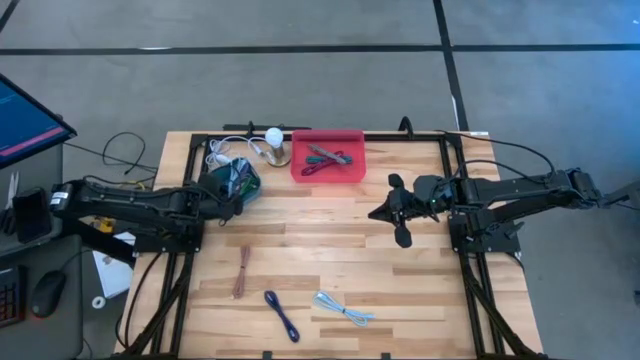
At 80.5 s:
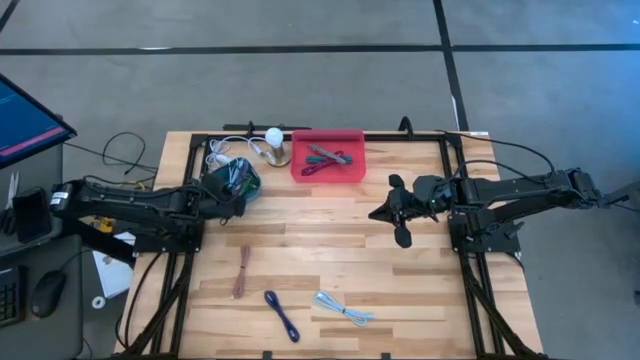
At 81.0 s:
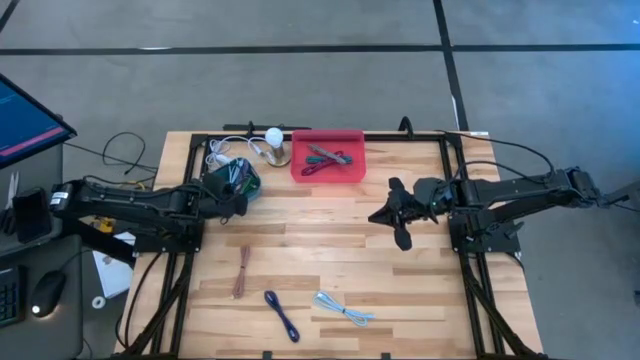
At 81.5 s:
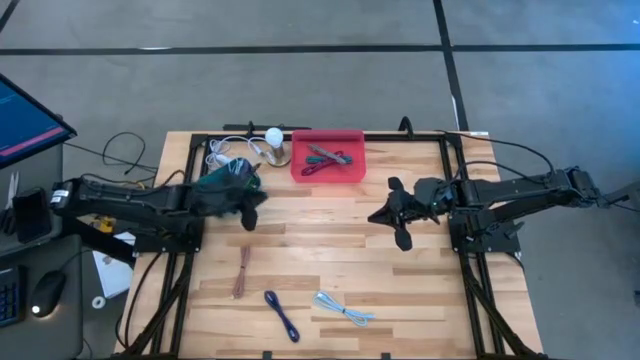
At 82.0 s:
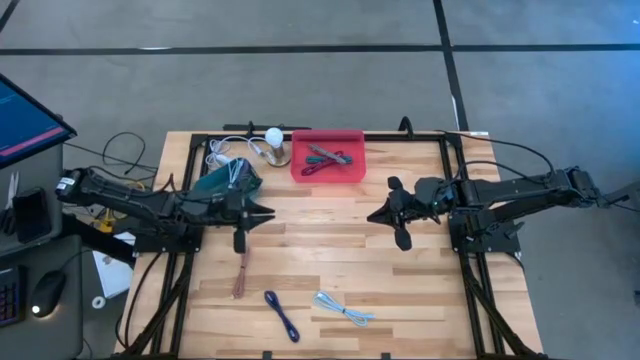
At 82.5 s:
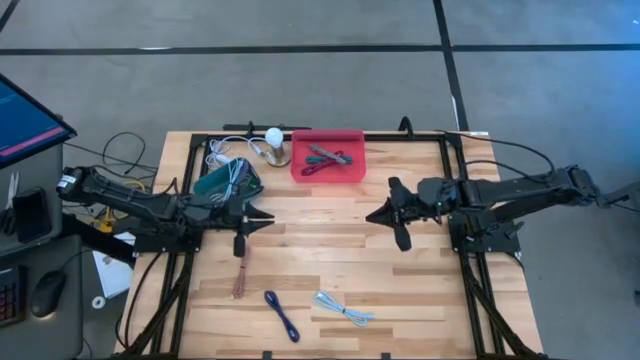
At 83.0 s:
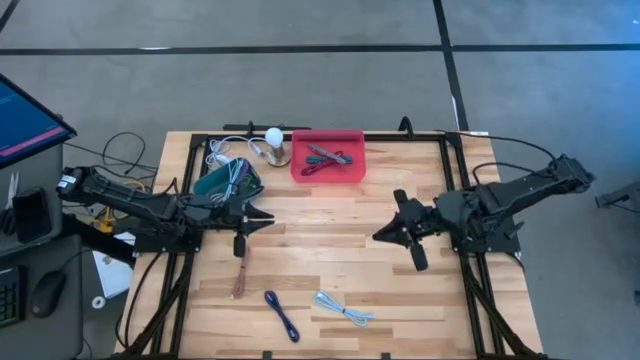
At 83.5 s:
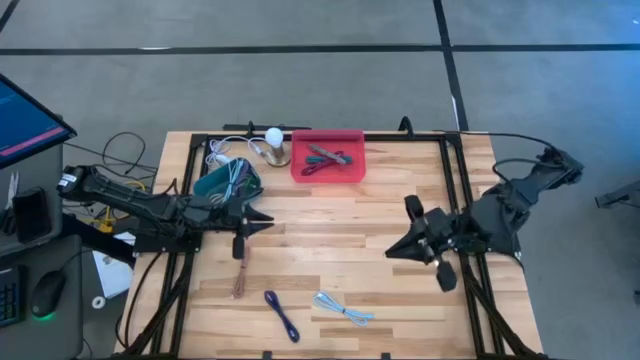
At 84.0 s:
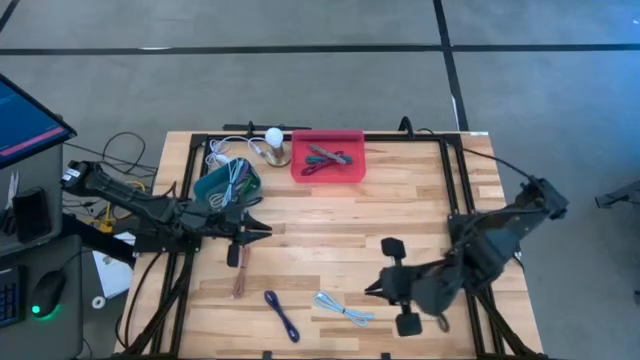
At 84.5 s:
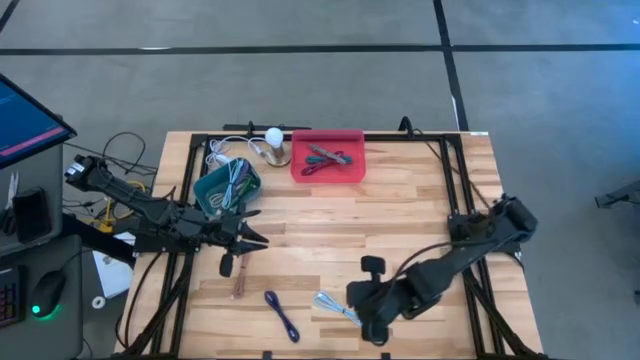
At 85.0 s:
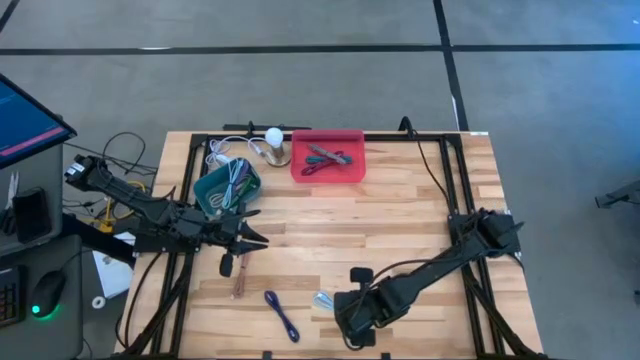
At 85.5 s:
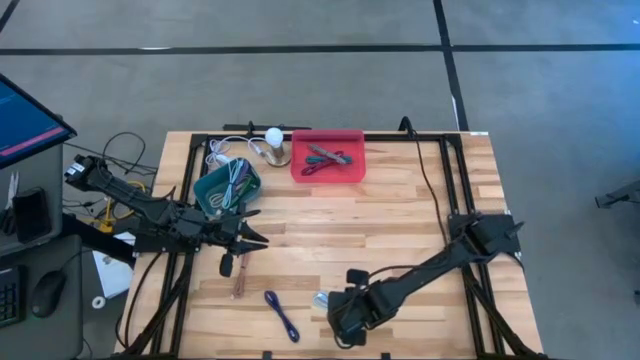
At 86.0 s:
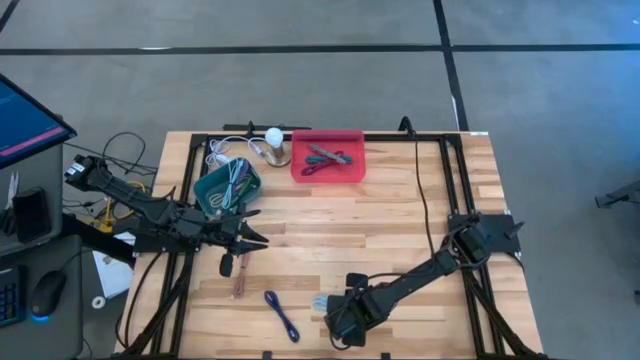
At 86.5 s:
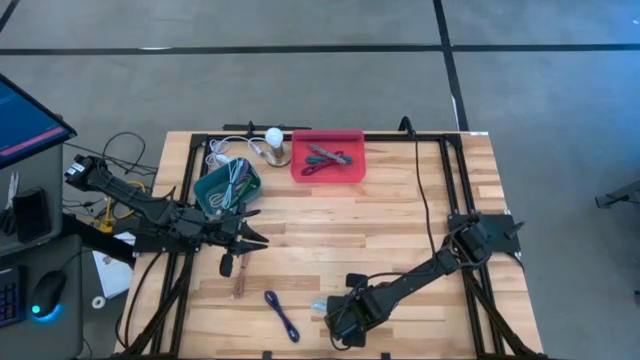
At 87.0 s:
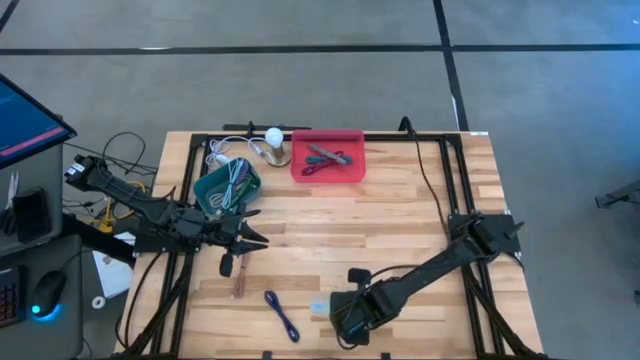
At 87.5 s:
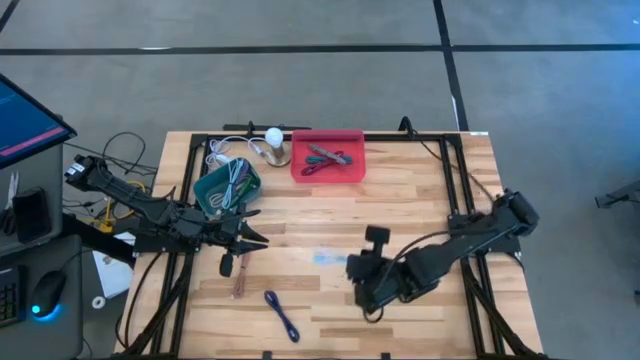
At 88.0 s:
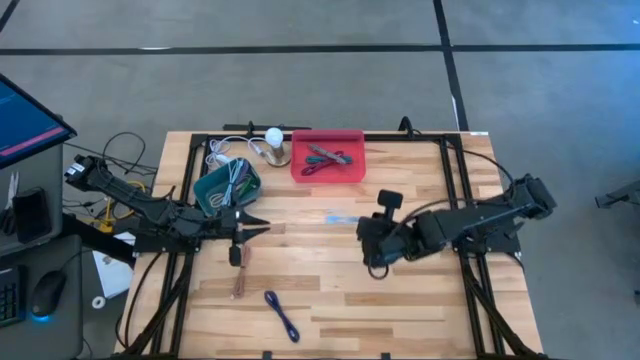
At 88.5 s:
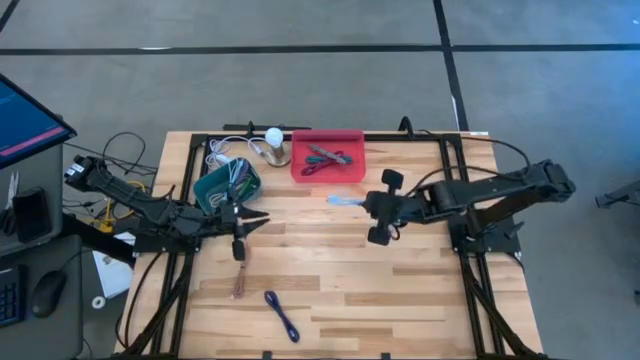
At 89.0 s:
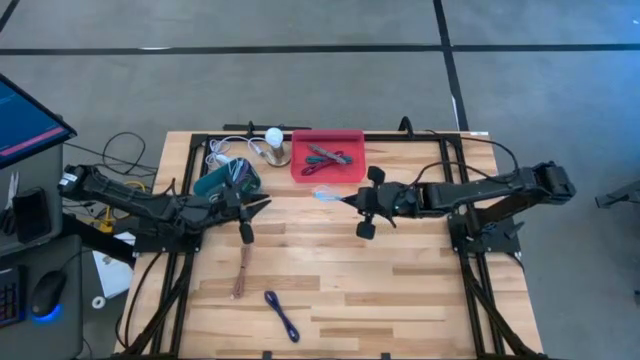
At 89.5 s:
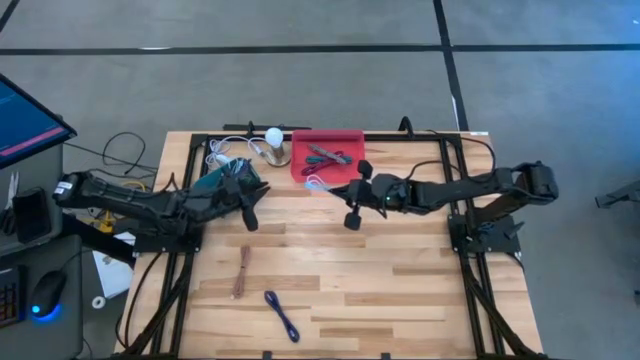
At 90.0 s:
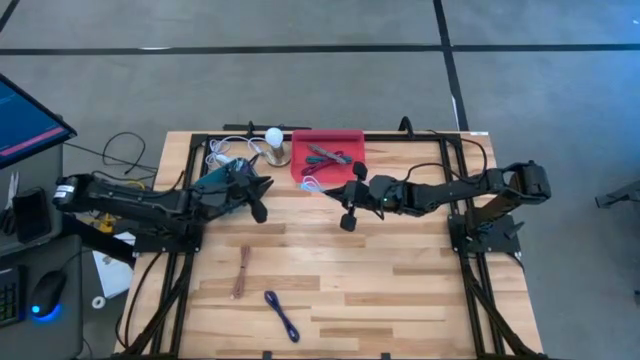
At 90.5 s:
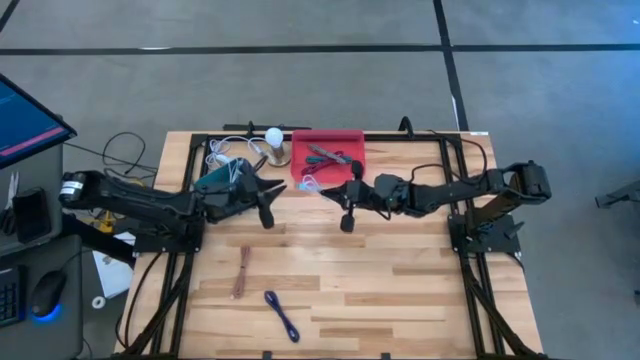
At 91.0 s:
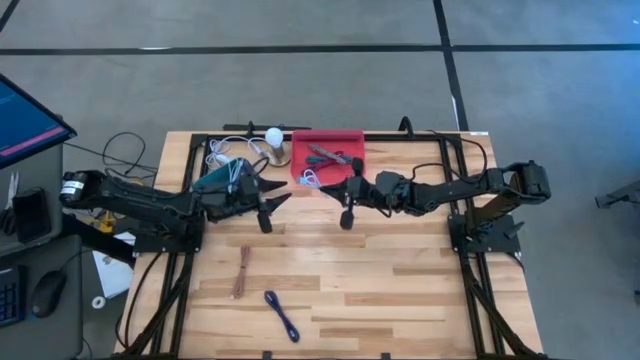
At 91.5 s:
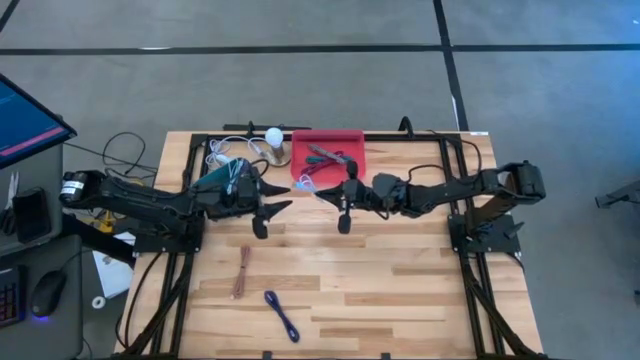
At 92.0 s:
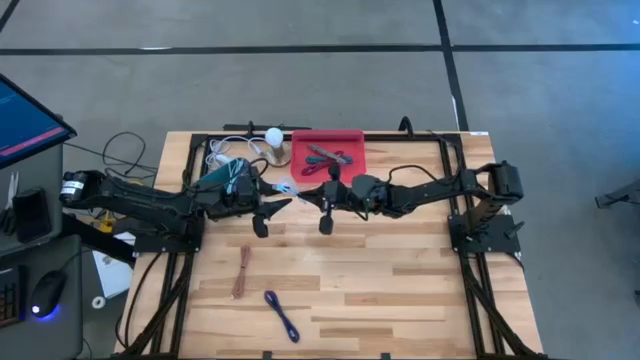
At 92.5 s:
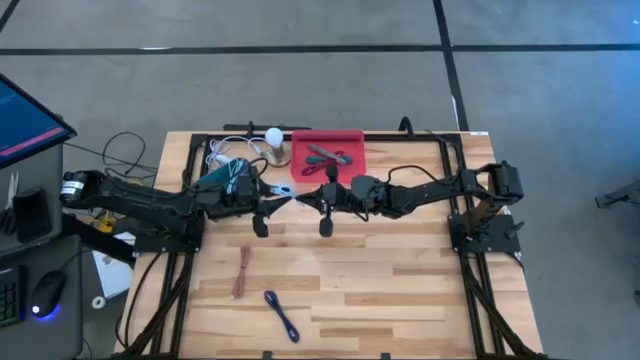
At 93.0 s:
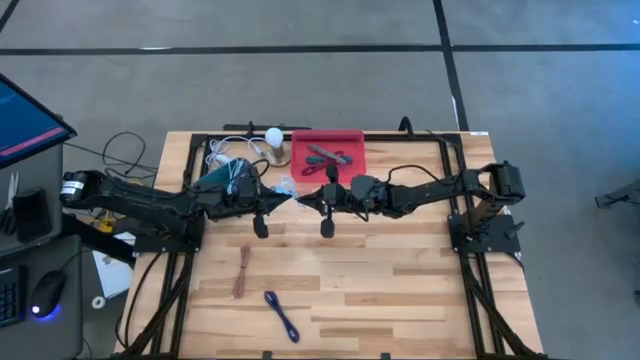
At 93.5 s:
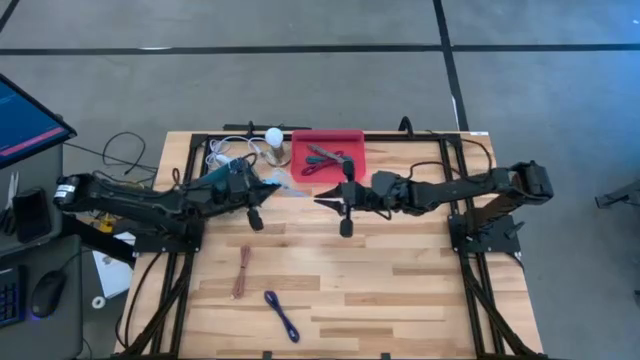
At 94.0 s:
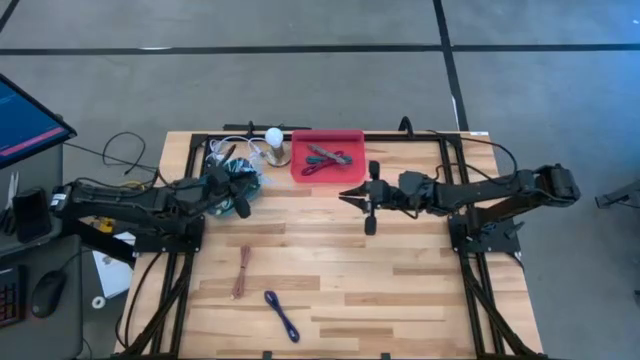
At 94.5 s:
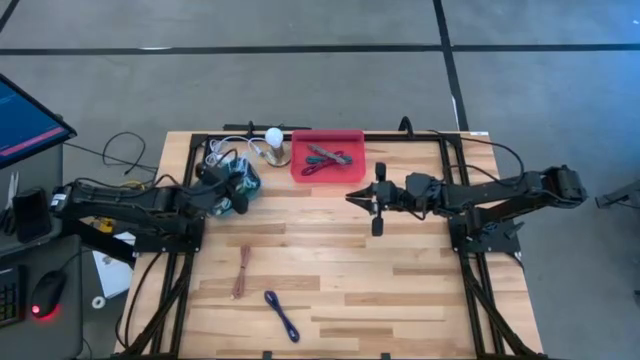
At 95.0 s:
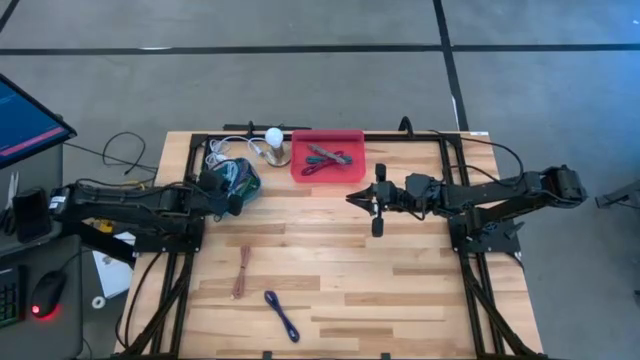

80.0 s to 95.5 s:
Task: Pick & Place USB Port
Put the blue USB cable into the blue bin

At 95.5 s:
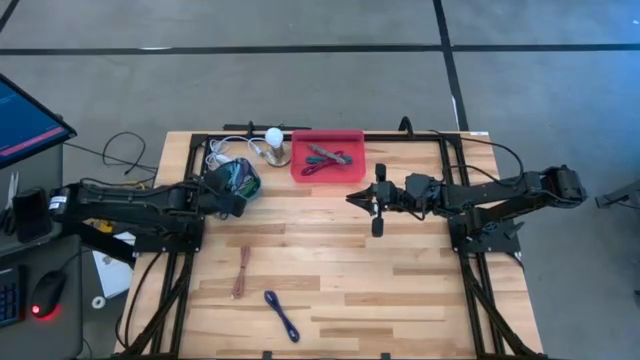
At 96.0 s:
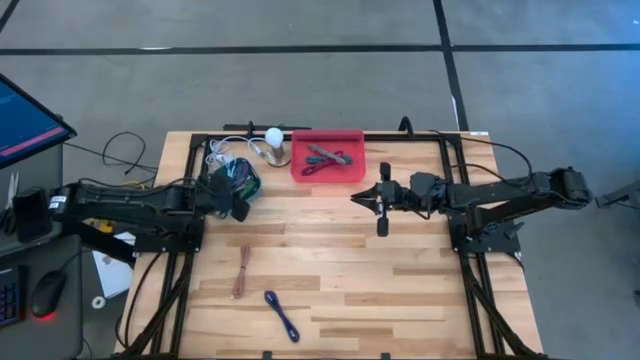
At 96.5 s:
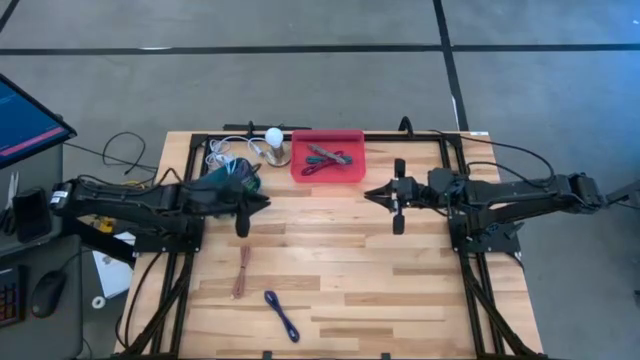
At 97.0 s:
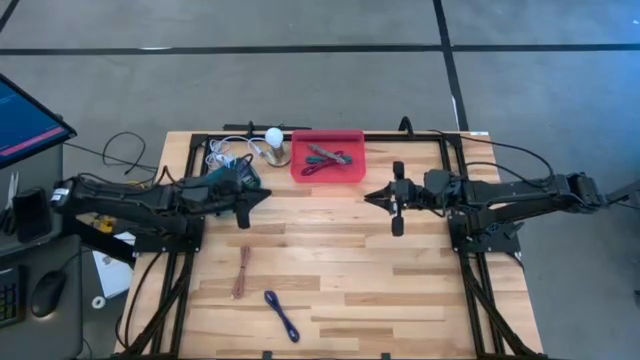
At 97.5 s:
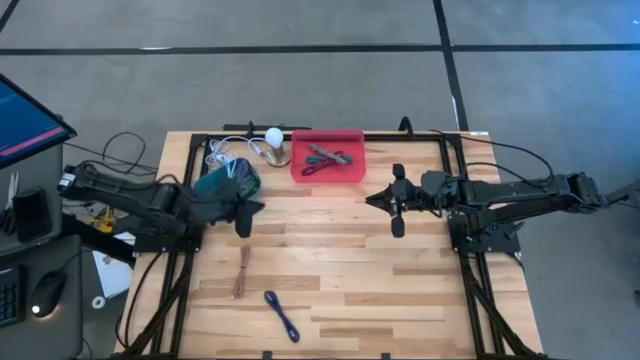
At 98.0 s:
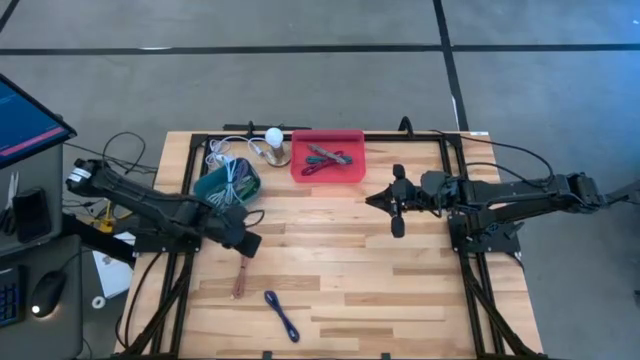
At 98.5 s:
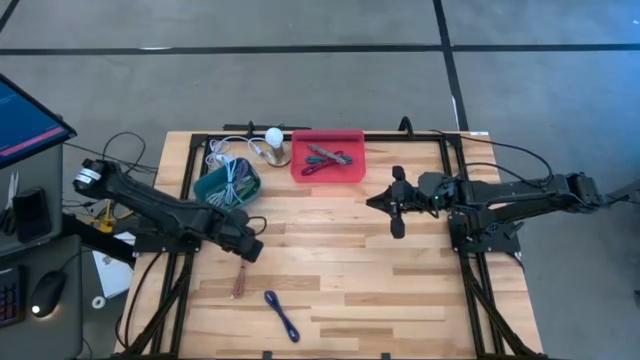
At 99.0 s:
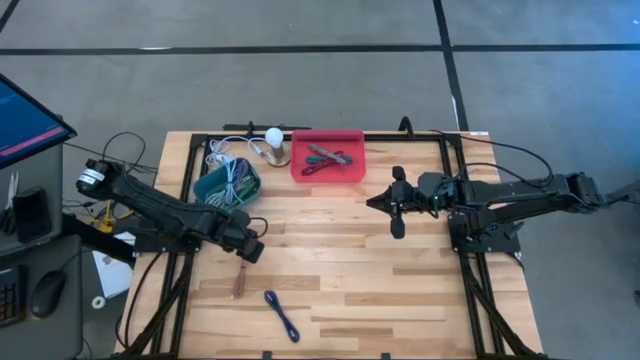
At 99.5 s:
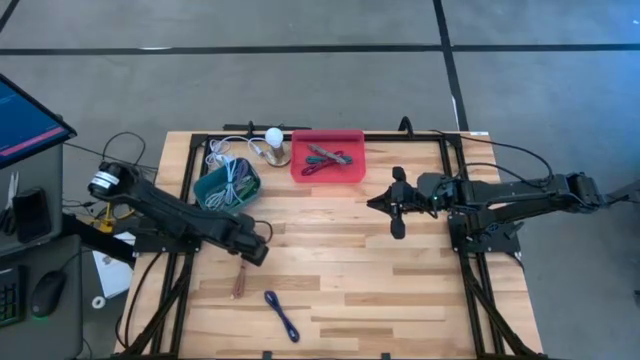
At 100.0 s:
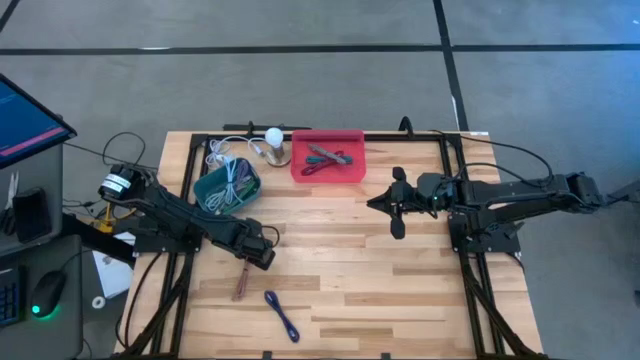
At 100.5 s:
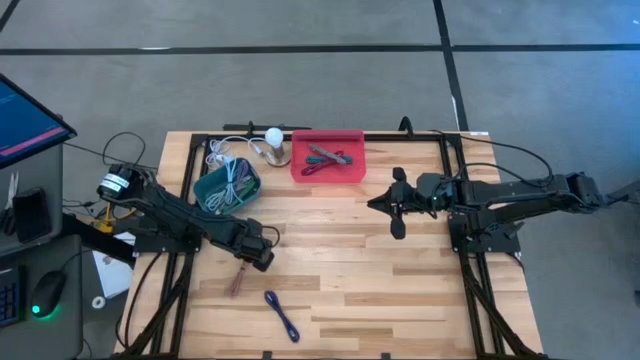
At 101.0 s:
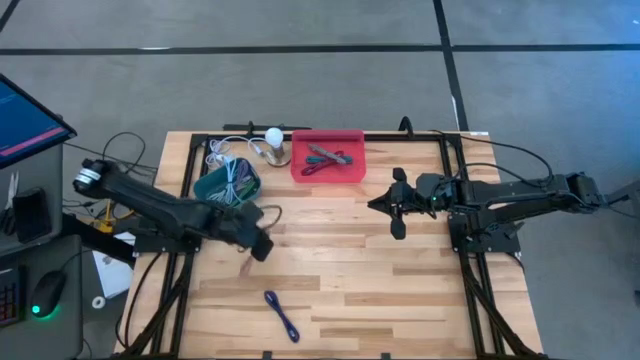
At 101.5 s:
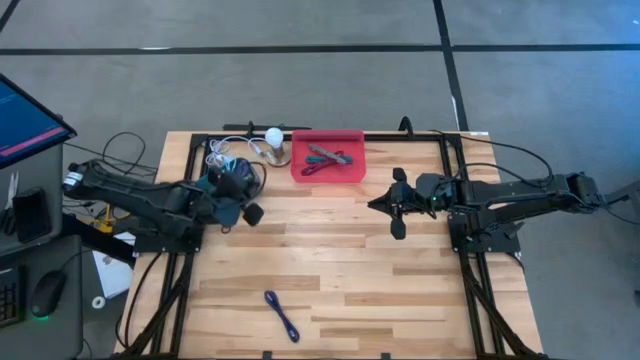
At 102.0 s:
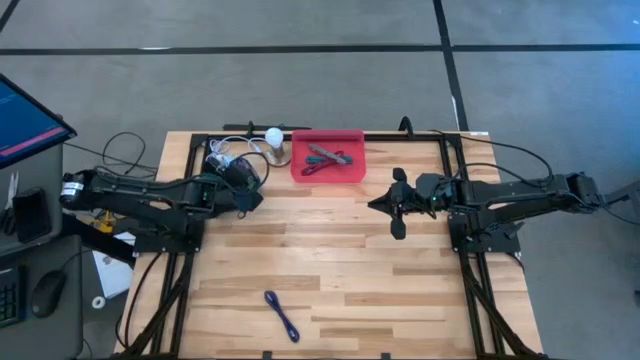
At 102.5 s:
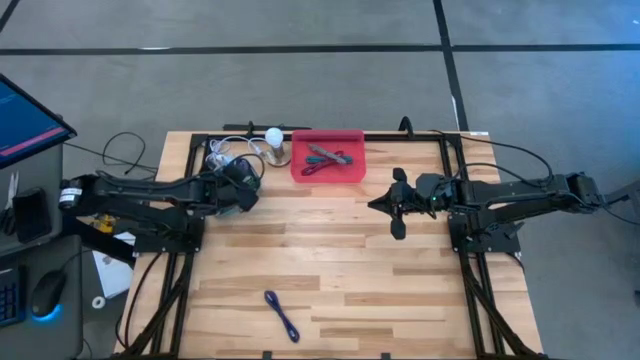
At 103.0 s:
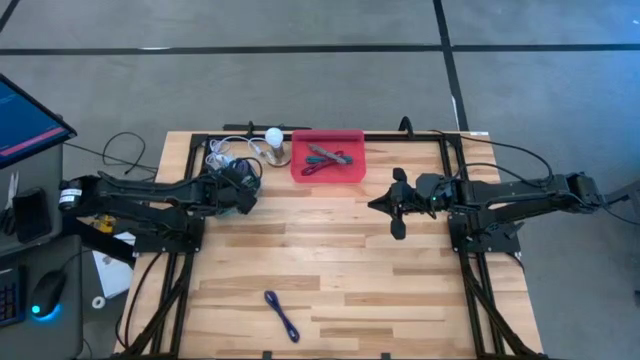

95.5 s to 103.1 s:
Put the light brown USB cable into the blue bin
